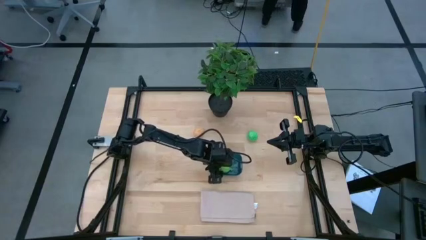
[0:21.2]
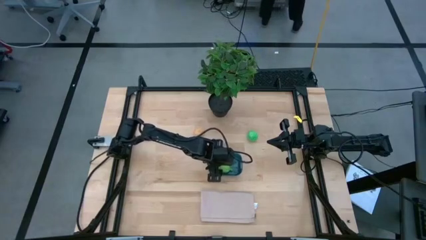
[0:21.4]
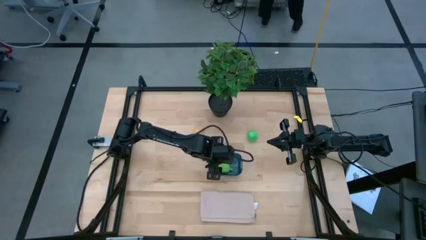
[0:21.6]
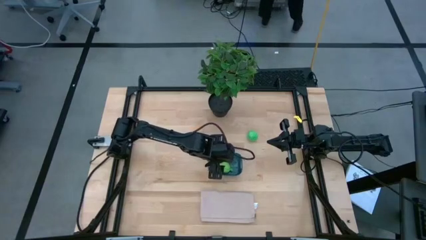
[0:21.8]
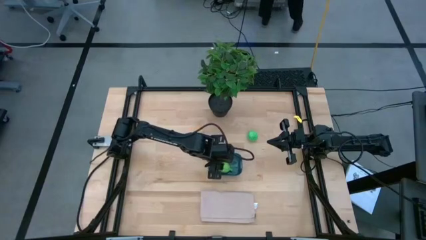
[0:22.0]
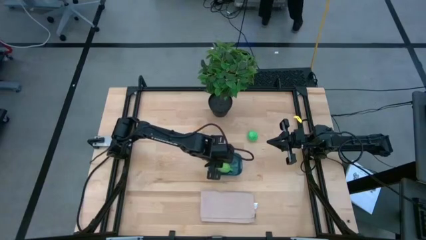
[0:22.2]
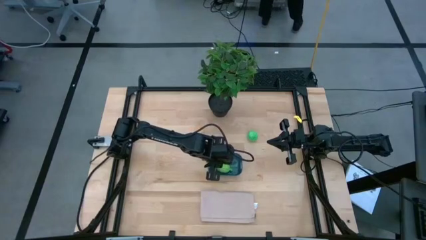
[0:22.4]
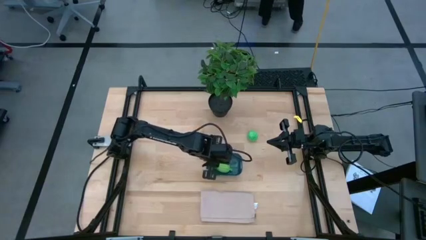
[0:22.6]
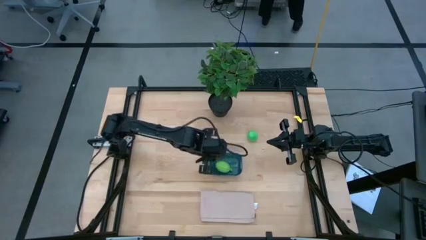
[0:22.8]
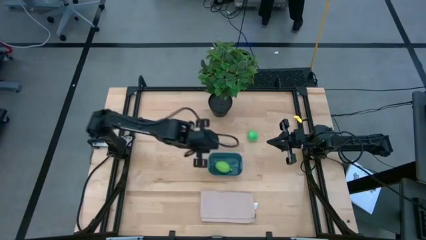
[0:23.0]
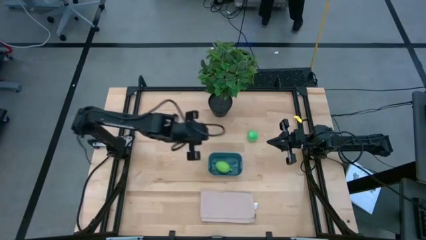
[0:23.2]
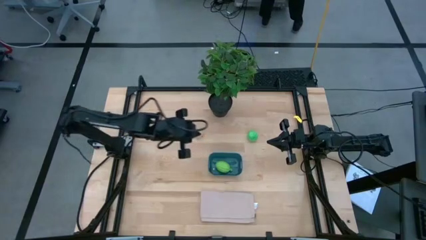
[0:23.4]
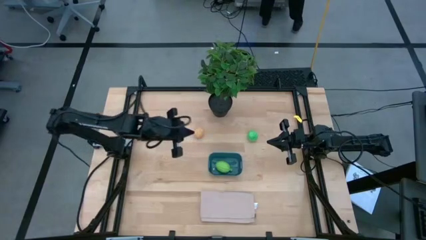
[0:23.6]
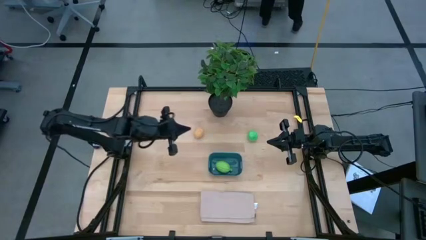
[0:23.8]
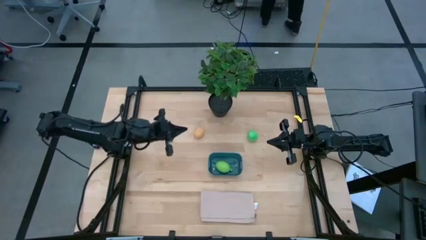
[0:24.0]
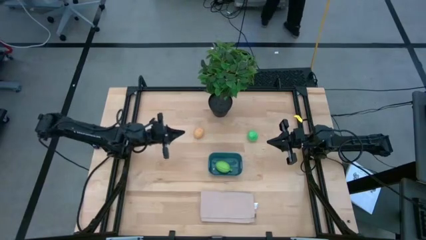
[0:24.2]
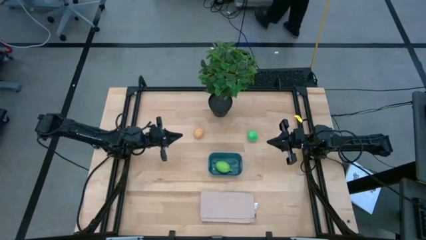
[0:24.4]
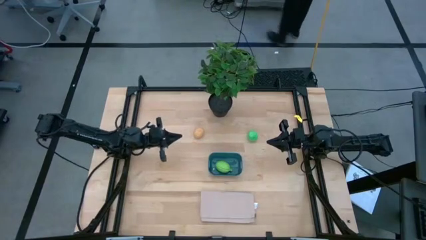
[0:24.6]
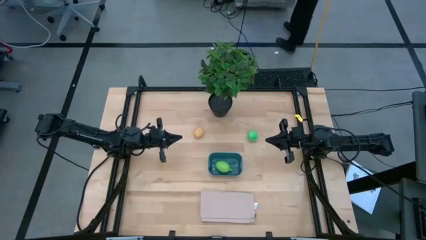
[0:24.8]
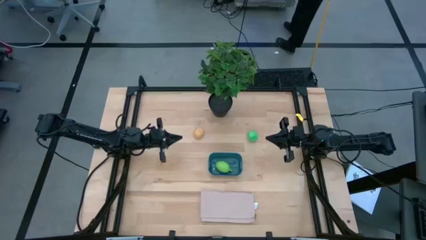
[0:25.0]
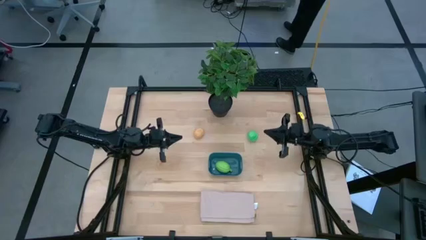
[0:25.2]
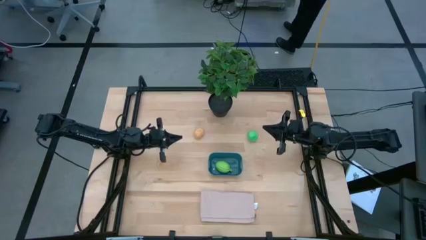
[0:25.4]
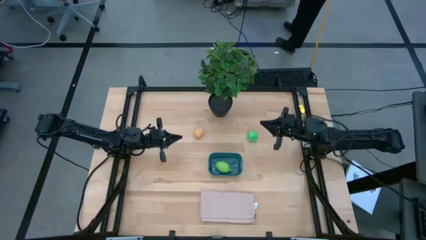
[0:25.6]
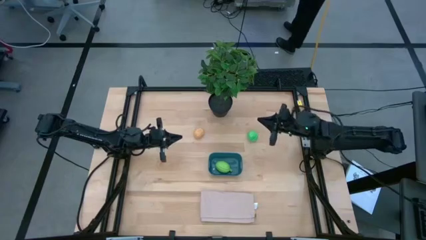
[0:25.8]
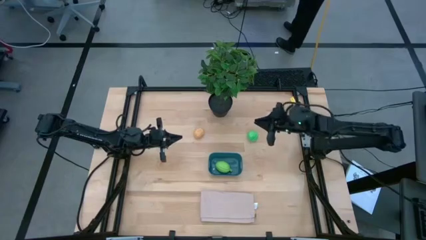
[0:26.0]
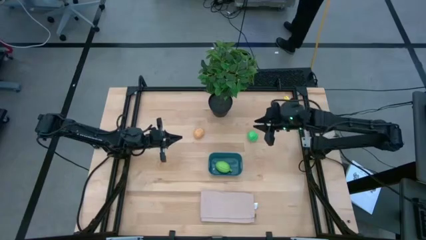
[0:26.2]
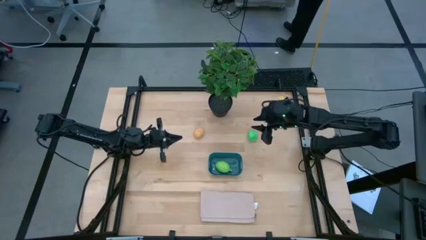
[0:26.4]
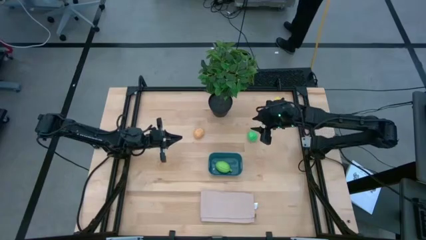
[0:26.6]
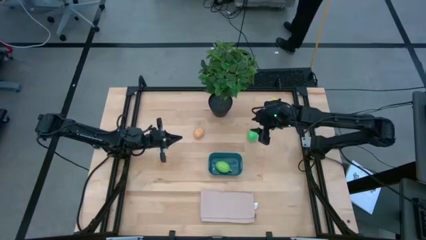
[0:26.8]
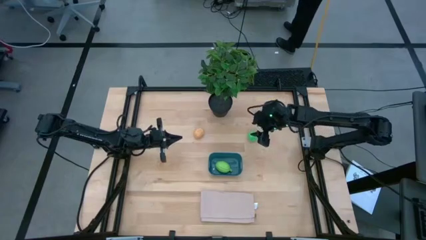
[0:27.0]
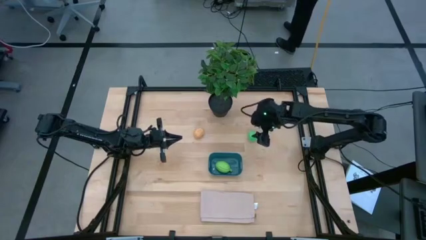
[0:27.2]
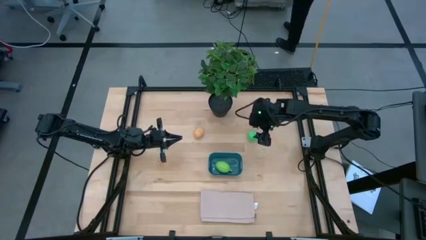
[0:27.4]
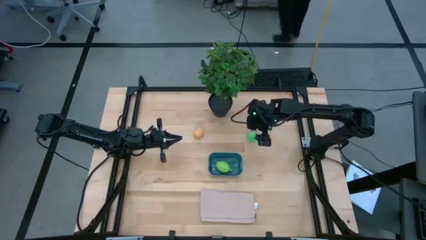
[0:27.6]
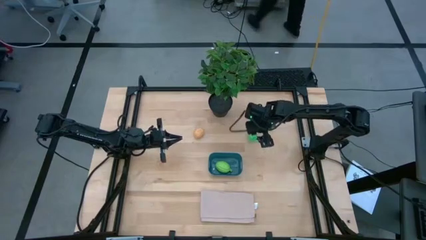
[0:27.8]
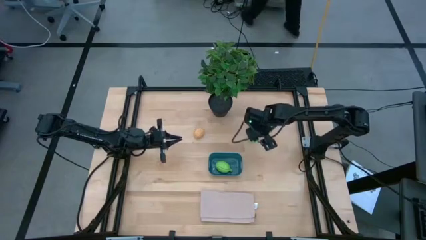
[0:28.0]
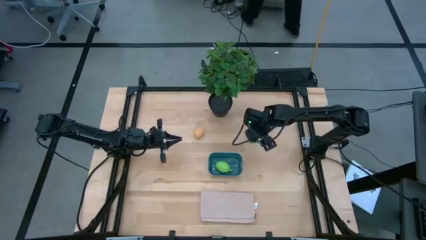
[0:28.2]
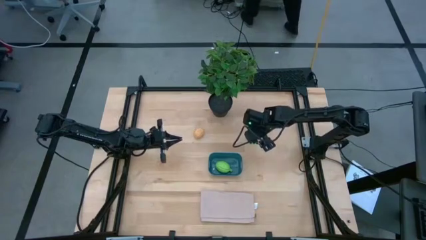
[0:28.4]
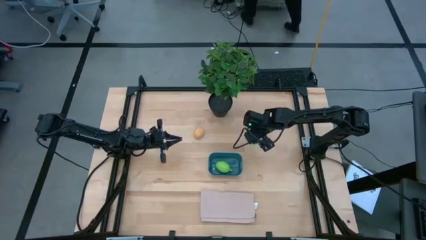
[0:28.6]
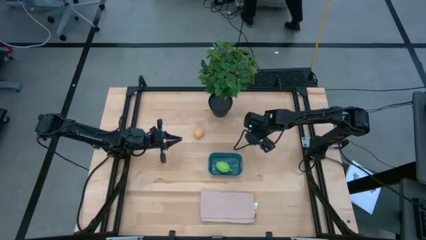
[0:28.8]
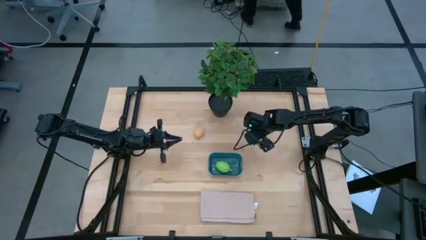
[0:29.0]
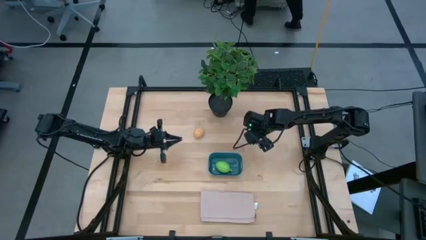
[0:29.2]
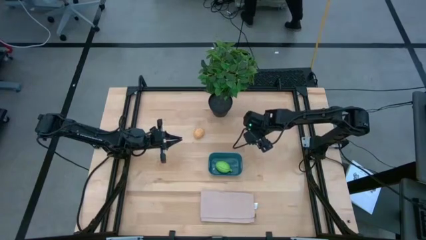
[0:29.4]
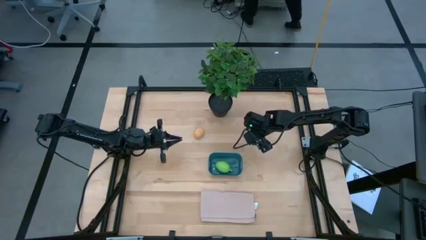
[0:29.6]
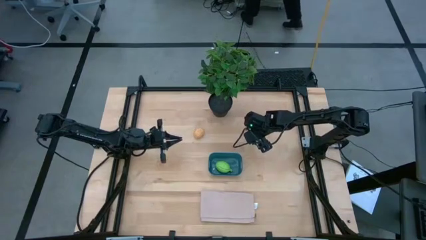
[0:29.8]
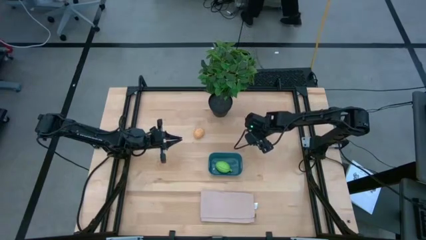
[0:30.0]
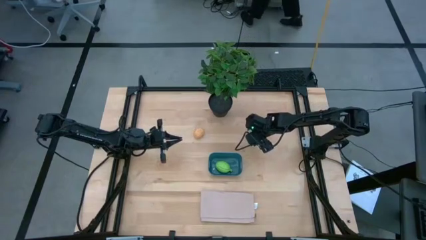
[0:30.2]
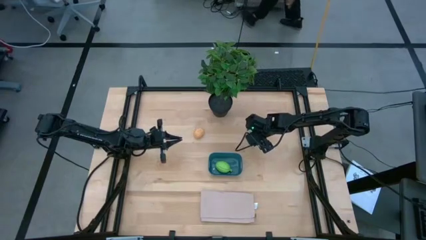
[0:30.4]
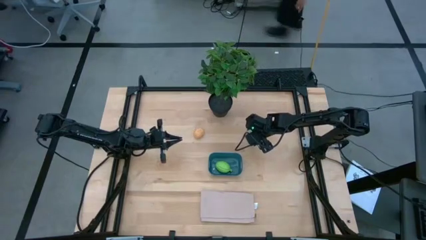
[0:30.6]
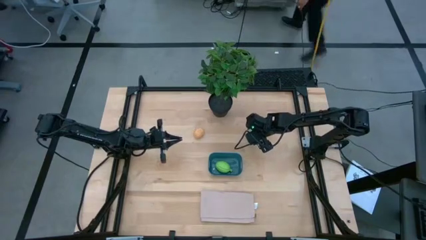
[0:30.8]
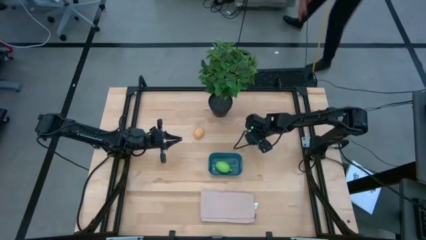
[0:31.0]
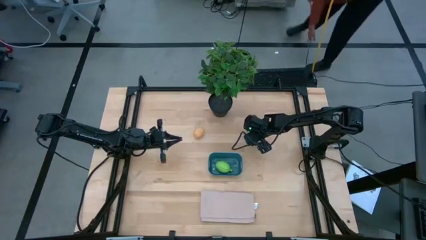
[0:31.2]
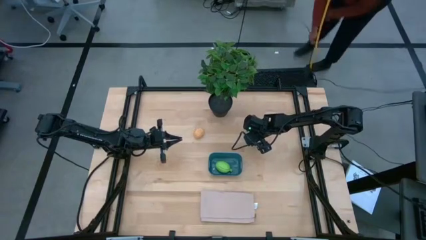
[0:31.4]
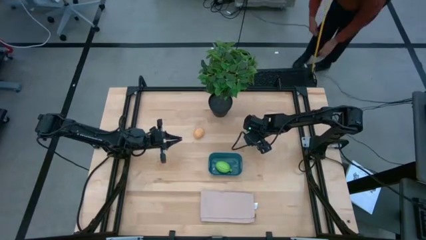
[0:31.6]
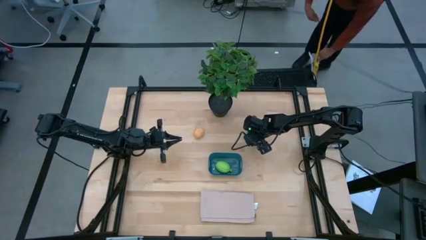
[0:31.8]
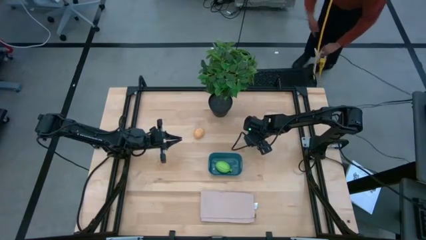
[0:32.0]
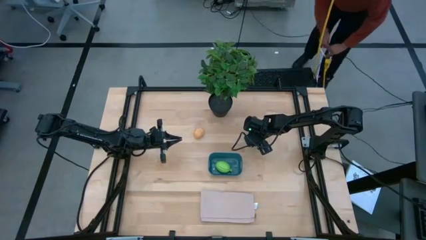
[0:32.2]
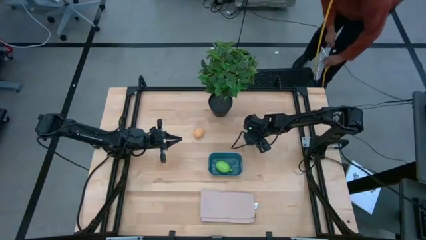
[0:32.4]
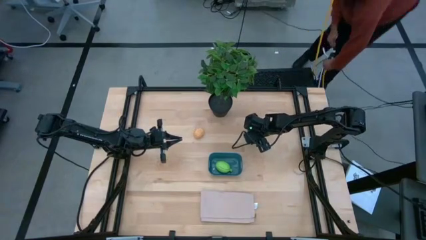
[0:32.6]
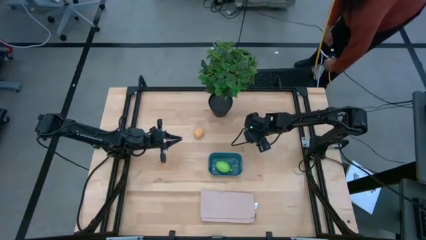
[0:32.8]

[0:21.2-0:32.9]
Task: Pick and placing Produce into tupperware
Put the green pear into the blue bin
